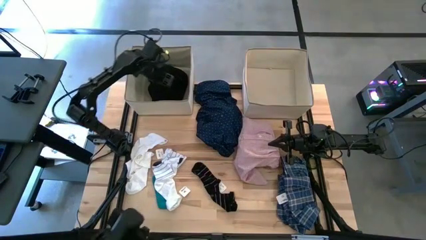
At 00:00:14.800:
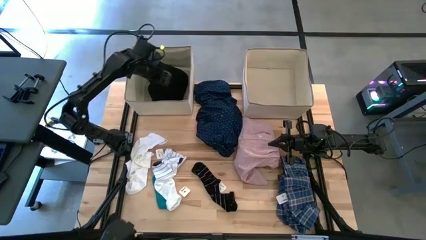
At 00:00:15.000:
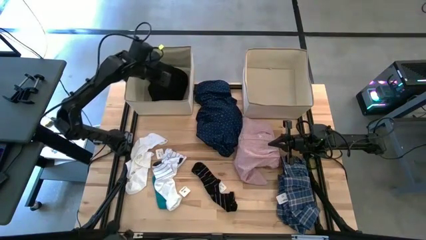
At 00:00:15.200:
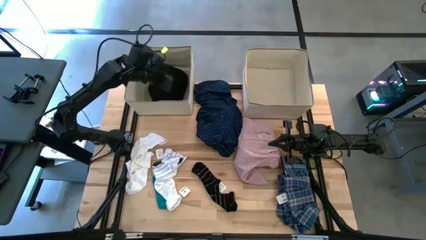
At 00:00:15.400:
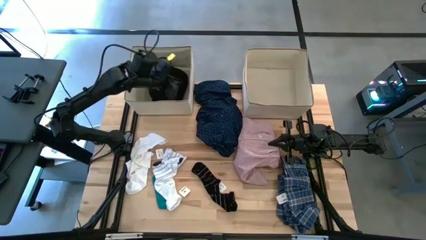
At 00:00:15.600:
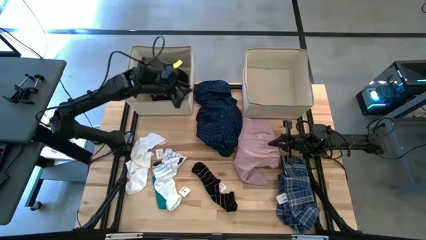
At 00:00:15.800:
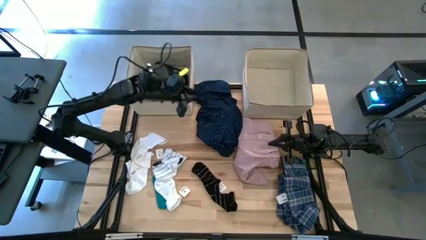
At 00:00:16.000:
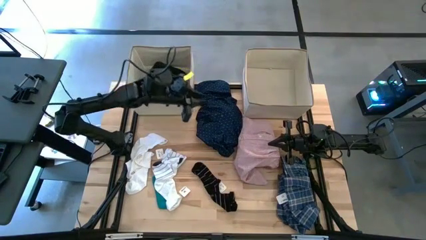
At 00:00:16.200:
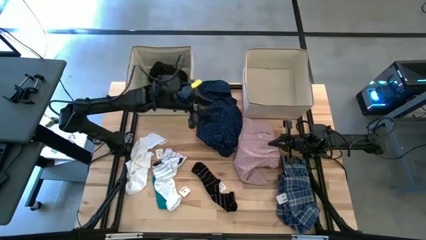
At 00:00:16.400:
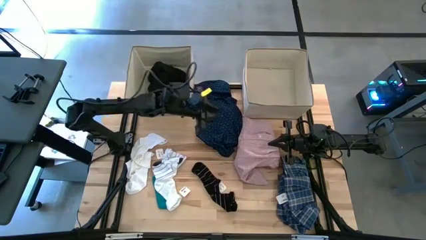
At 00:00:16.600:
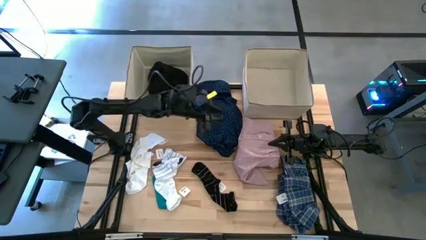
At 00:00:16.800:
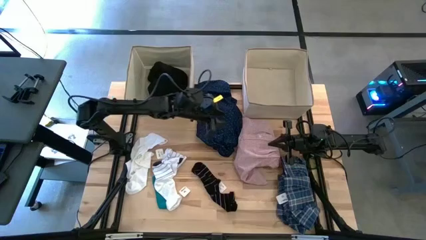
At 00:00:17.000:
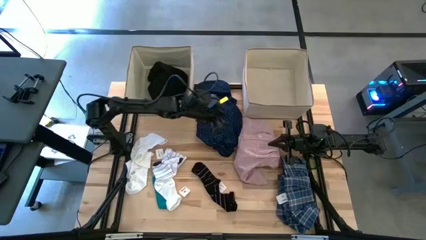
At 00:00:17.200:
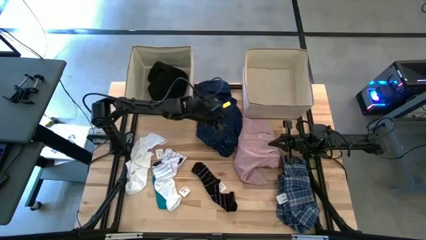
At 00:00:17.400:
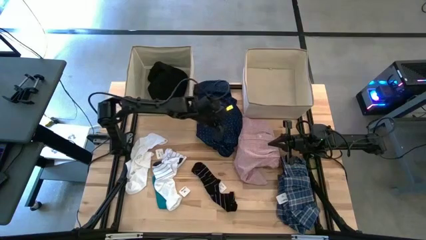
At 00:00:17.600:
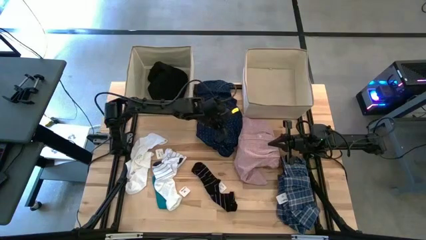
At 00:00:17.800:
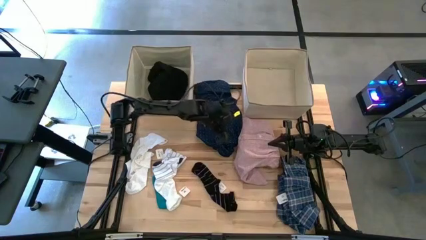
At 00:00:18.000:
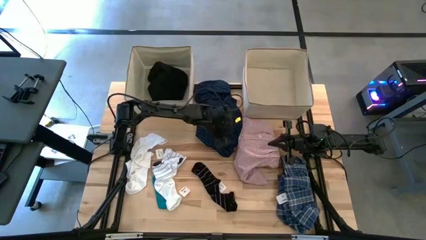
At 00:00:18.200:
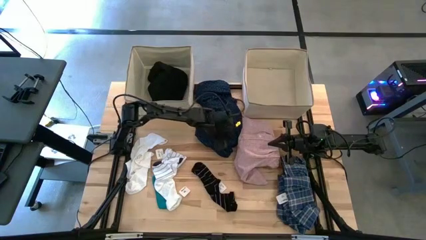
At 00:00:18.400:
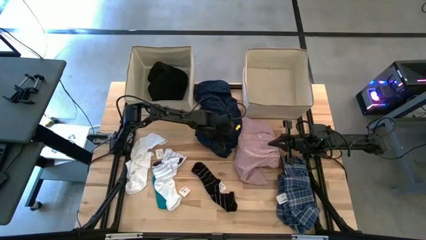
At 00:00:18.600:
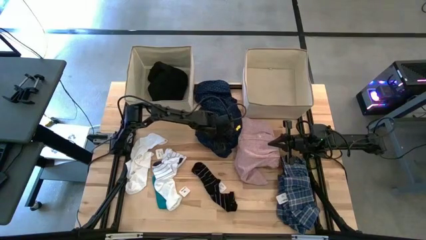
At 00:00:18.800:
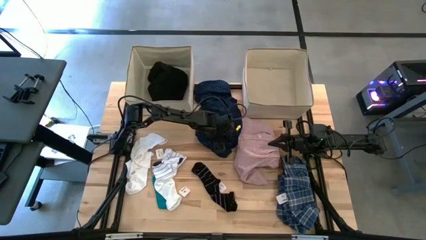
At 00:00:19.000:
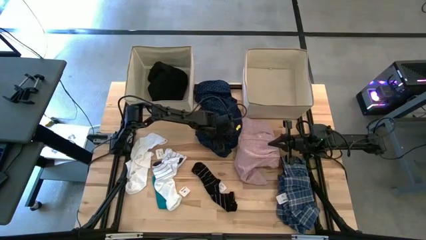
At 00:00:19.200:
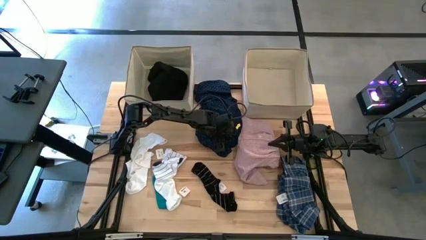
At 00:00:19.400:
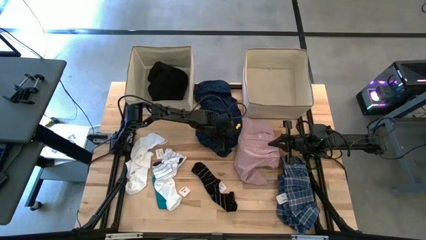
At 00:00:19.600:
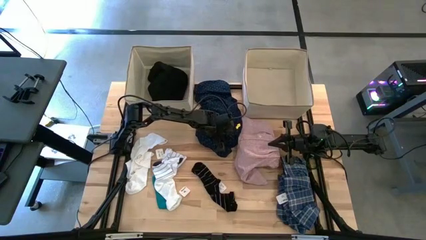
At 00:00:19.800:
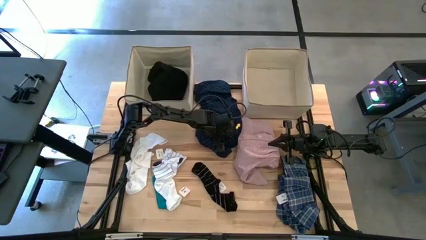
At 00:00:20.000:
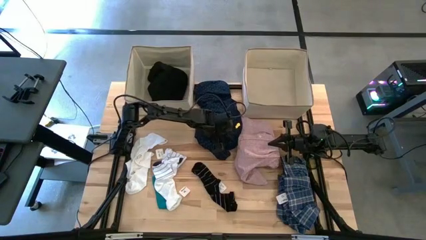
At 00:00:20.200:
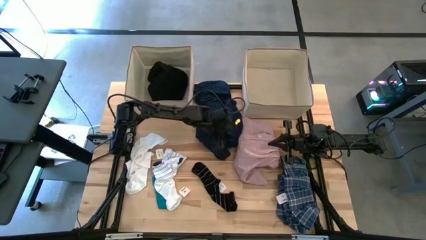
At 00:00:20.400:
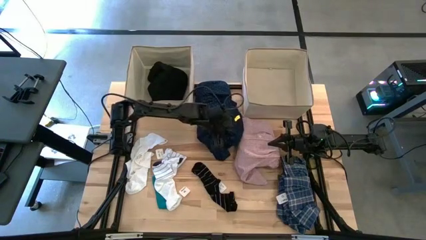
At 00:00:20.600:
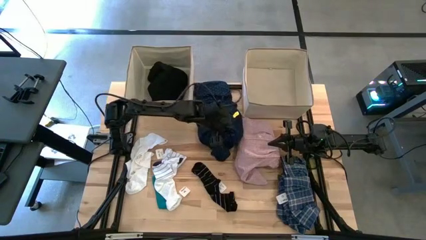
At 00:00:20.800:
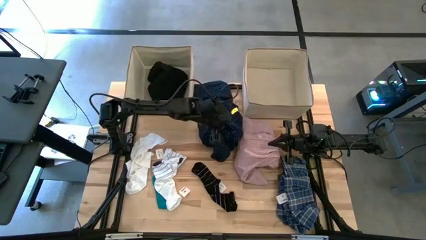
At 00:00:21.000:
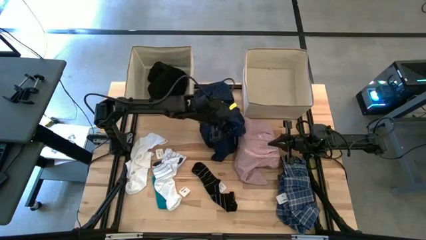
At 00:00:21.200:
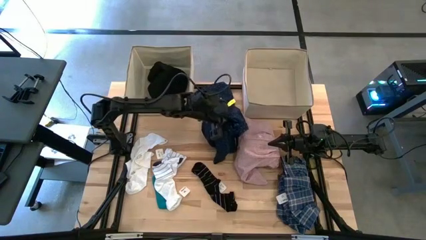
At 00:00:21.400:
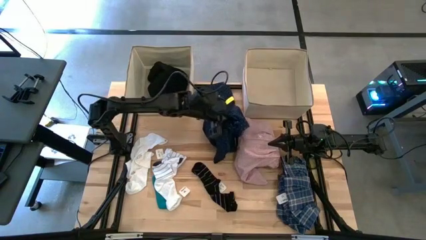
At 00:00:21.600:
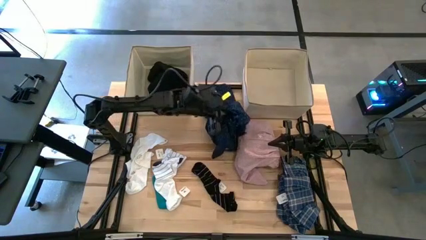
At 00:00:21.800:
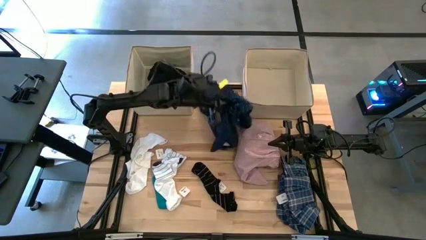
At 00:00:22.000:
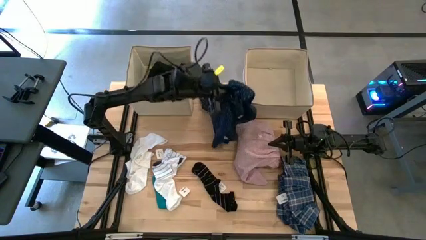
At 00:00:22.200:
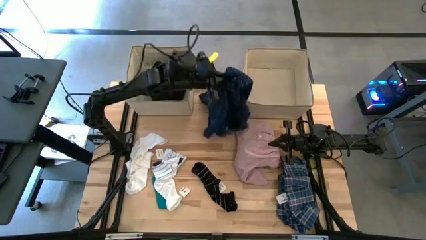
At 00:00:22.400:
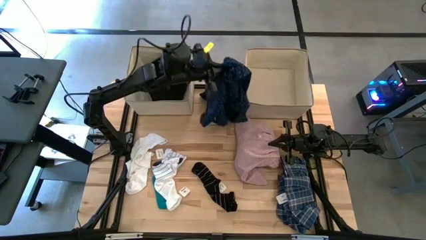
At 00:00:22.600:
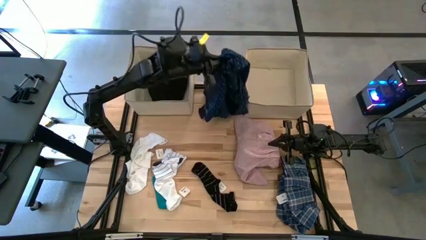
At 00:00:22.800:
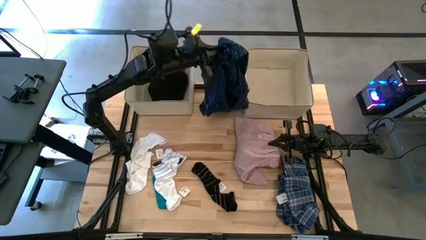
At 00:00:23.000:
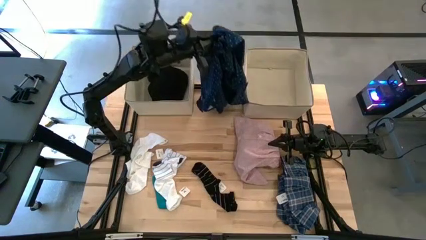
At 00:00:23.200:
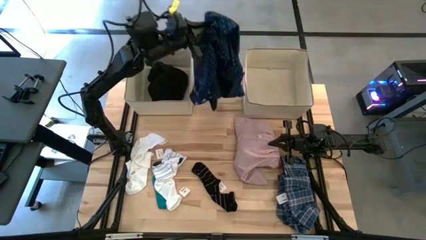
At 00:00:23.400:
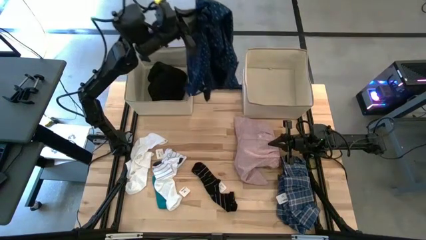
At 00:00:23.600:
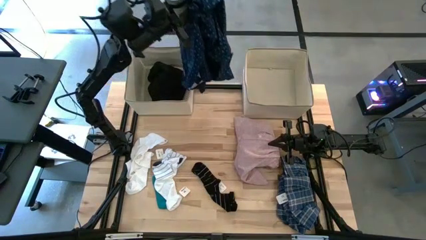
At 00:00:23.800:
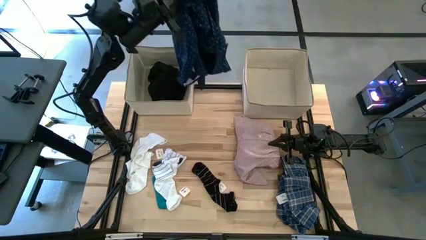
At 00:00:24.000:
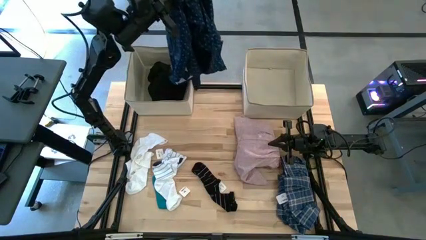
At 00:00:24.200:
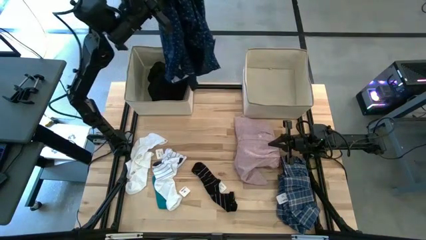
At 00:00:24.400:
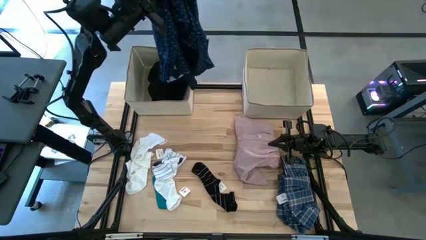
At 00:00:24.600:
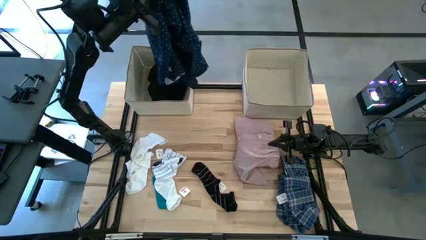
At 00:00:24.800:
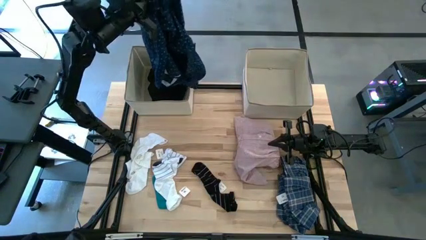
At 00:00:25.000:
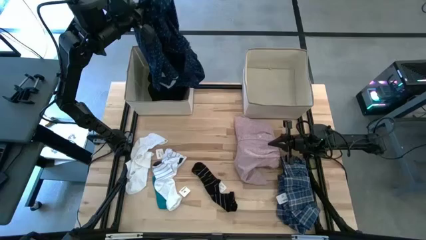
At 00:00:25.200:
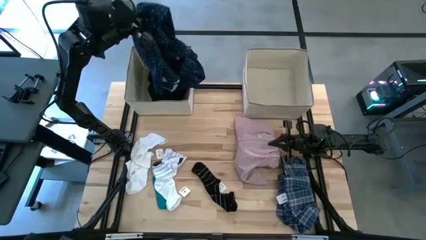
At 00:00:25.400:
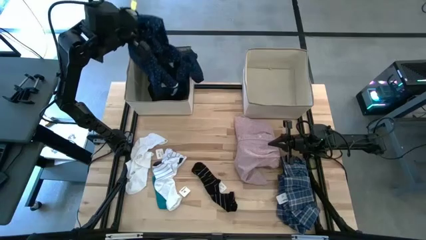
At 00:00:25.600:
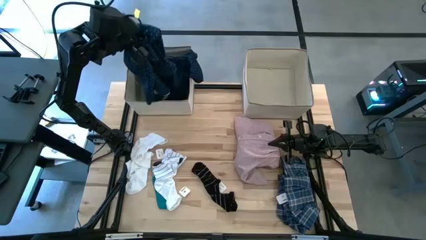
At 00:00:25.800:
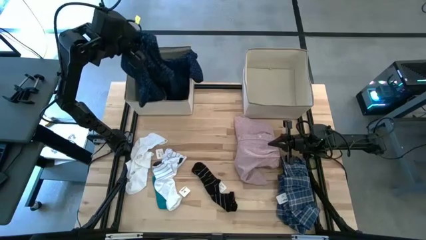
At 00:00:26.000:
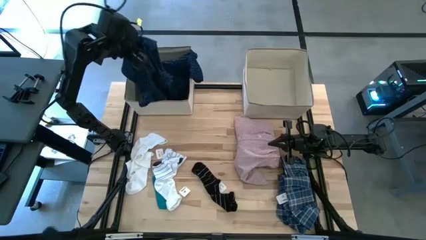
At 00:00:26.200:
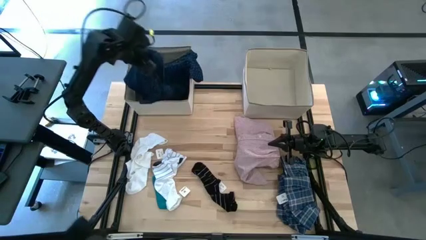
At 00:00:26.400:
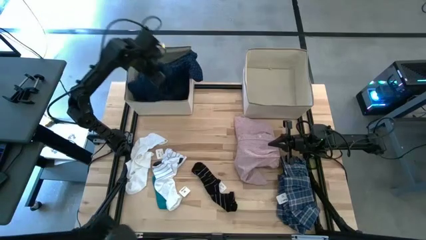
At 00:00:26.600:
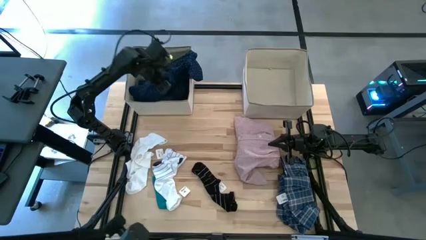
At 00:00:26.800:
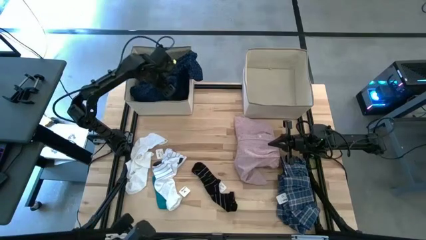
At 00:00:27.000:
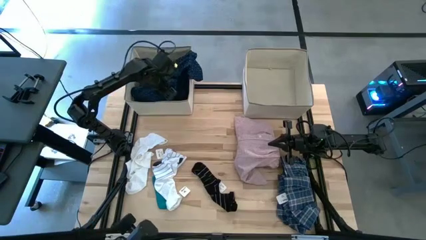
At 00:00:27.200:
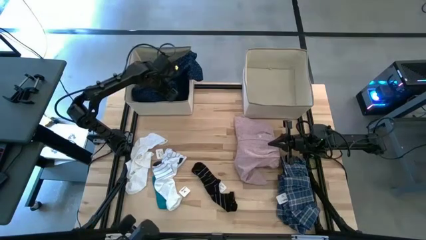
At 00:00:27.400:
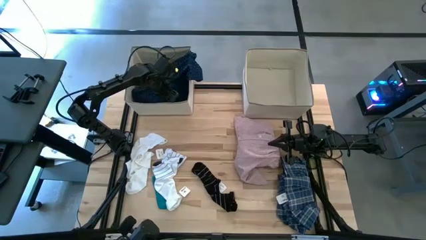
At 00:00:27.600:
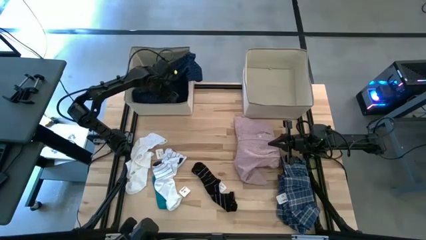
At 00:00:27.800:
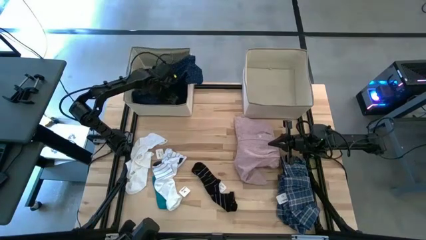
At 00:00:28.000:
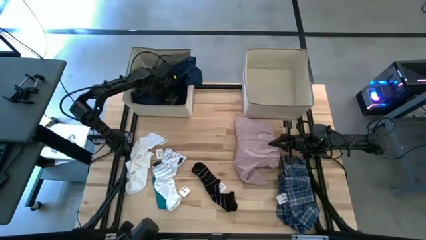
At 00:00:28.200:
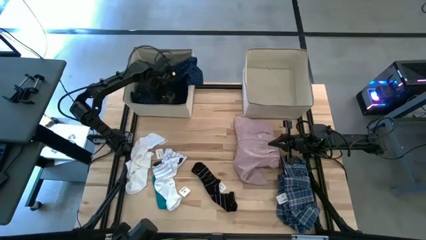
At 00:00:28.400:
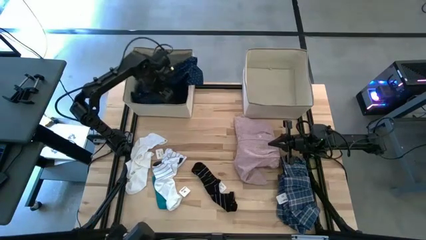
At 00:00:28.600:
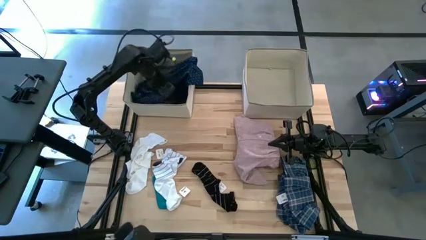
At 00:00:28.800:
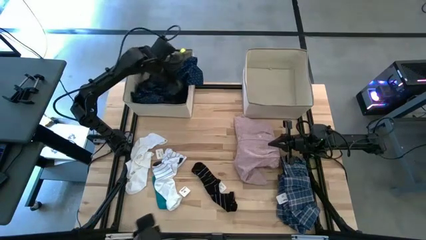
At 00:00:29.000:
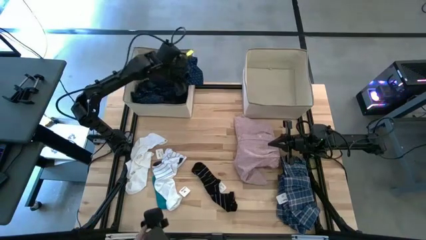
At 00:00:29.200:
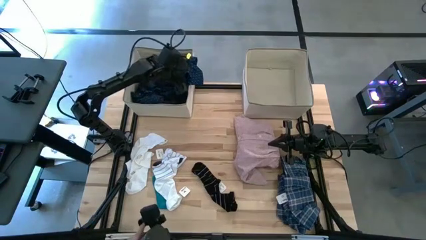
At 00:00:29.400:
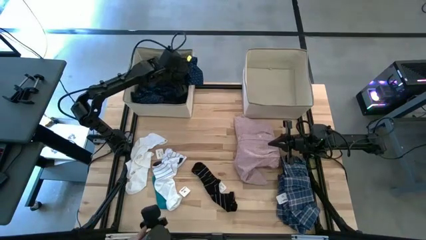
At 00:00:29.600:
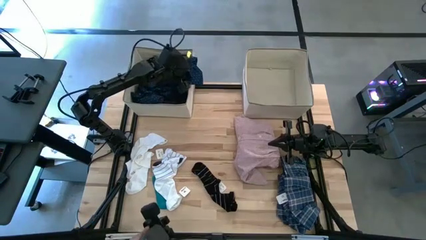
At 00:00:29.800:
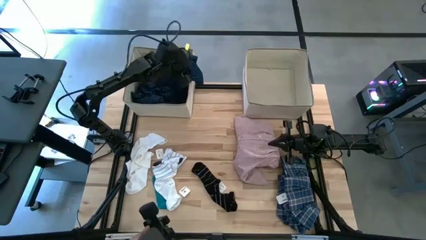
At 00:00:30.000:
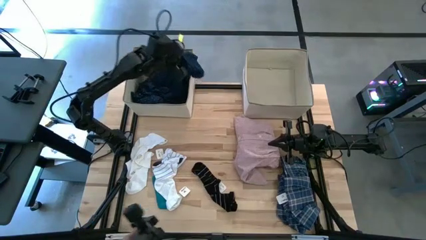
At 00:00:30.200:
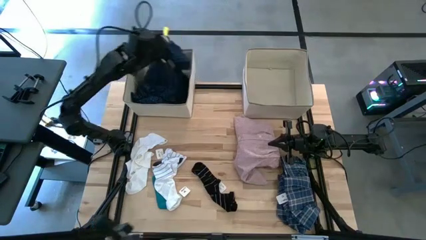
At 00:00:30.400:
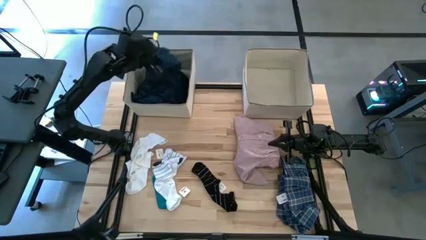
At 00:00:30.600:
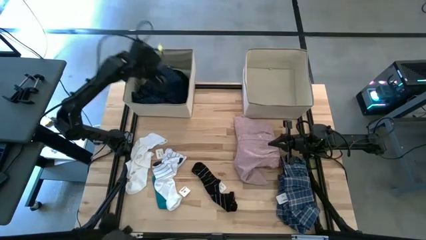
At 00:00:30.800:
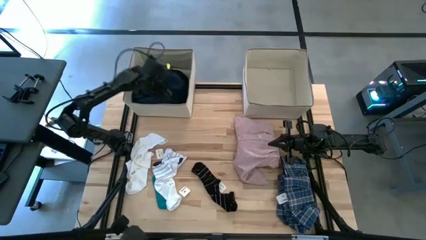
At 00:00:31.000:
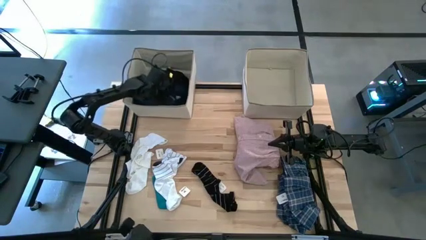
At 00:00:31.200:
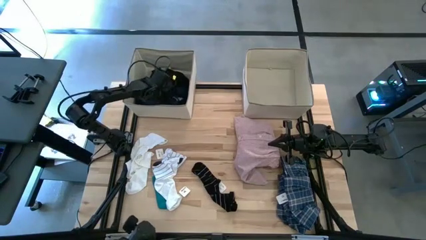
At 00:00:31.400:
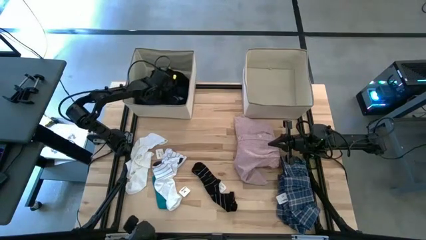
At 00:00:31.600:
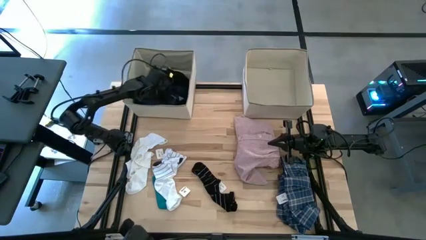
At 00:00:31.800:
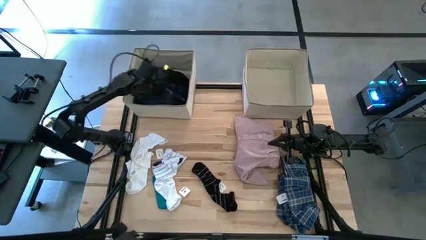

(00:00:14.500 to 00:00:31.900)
Task: Sort clothes
Put the dark blue polo shirt into the left laundry organizer
